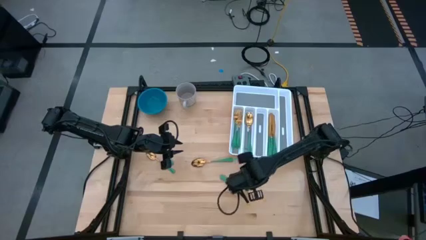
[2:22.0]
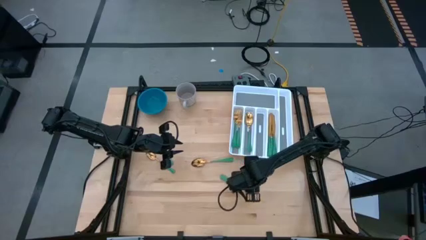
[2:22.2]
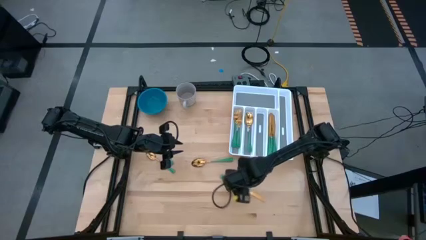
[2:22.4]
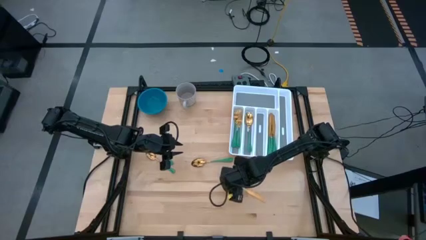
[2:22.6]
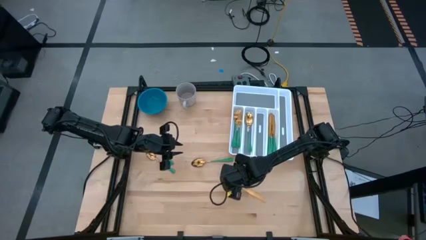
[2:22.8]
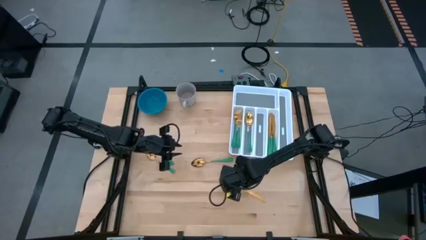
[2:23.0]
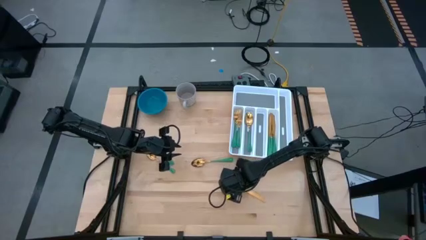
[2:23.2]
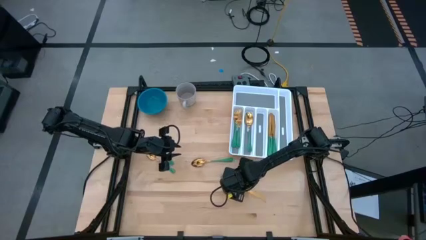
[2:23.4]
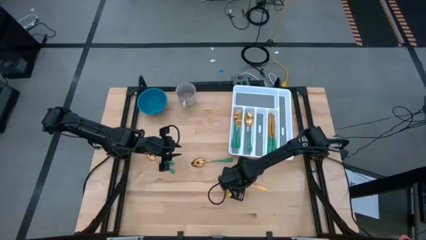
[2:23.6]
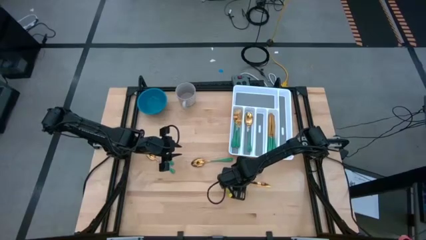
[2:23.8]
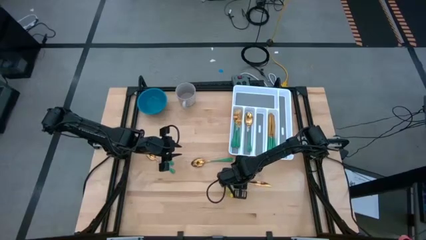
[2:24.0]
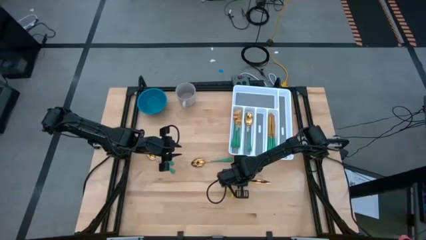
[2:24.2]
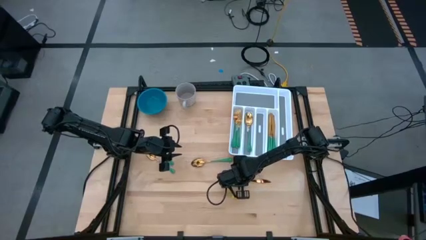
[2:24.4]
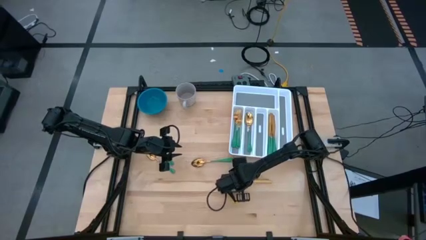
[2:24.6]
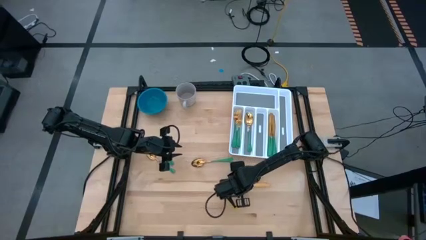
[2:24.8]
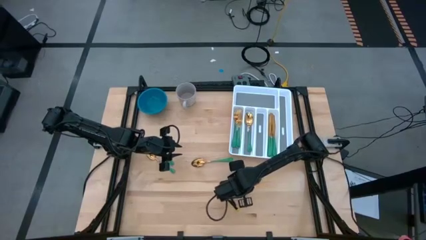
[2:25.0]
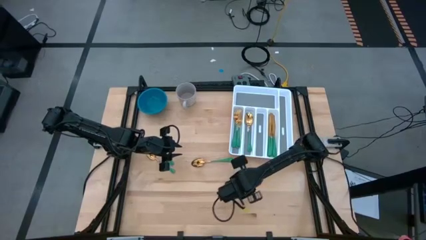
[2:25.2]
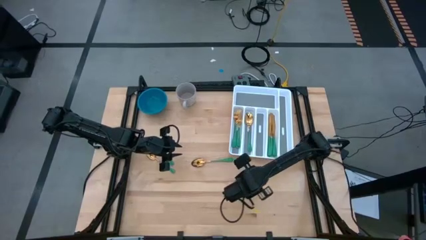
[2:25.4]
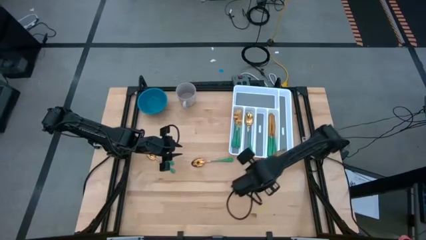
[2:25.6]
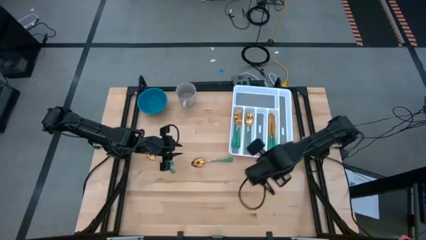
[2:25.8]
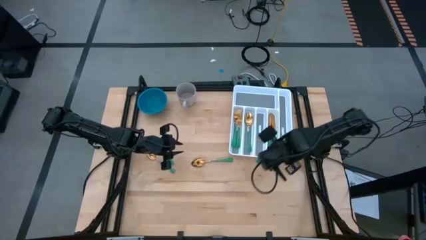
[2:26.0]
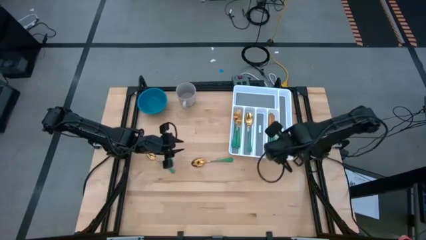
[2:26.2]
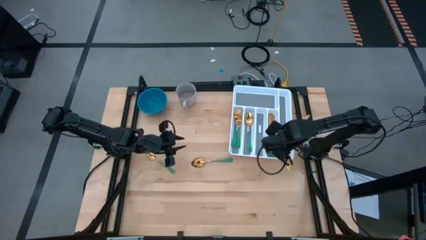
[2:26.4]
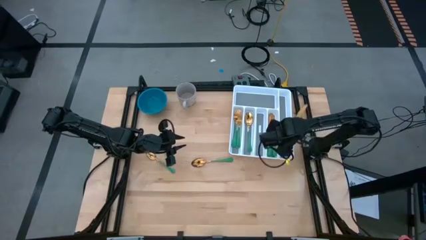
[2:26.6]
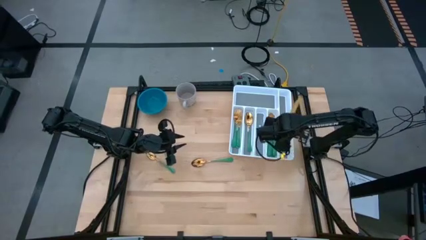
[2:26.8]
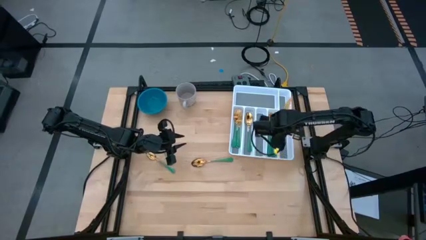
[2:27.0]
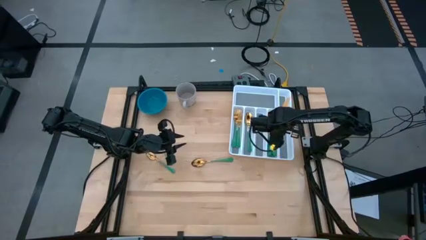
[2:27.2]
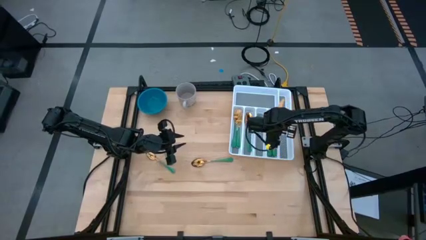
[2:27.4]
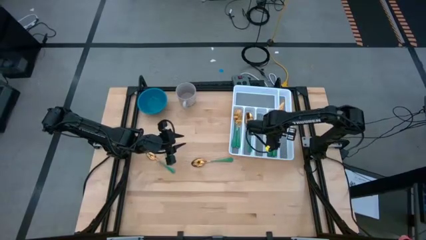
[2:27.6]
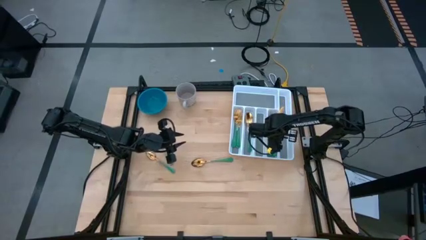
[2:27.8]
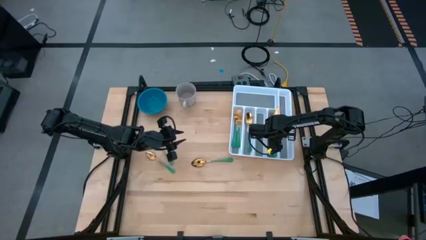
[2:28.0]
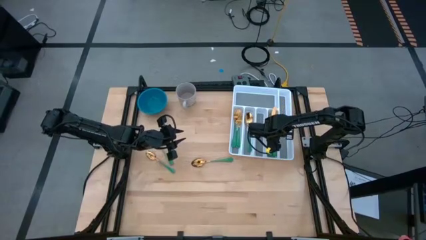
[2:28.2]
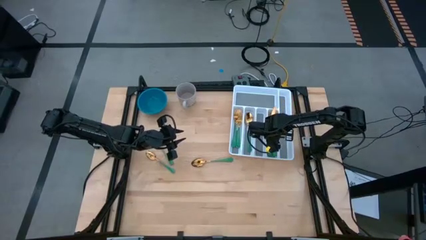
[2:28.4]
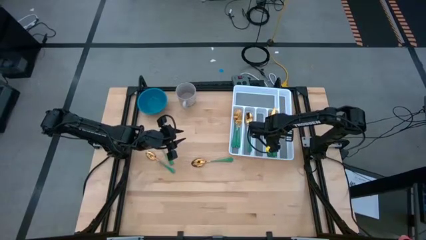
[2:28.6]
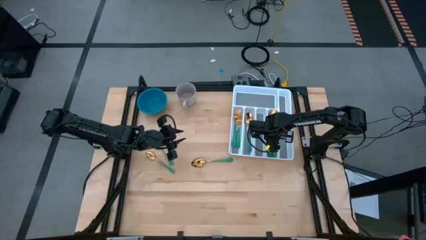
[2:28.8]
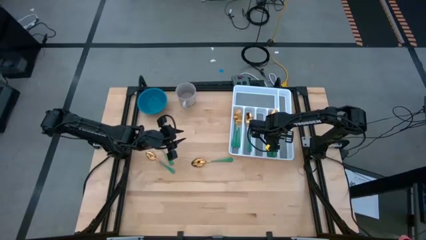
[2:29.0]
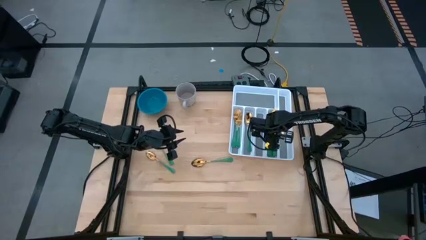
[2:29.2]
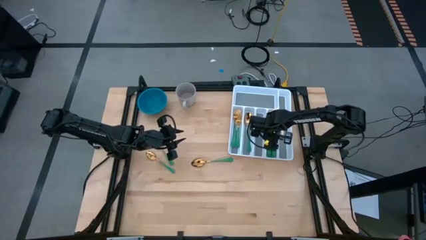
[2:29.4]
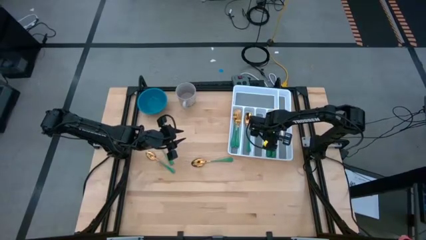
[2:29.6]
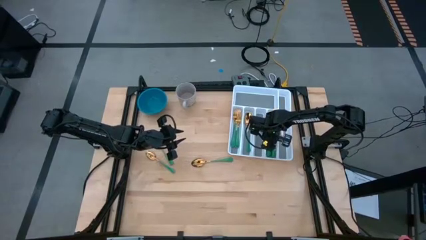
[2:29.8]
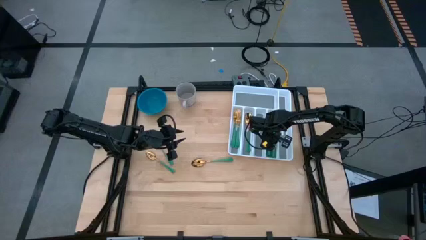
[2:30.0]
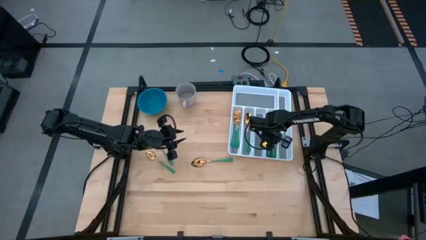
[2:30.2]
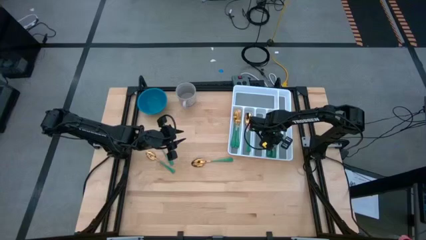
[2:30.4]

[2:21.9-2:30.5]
Task: Sort silverware
Put the green knife into the white silverware organizer

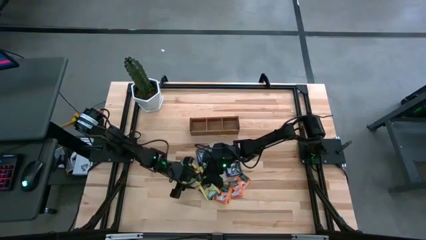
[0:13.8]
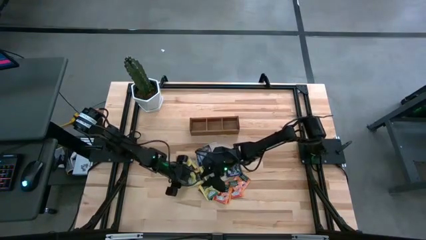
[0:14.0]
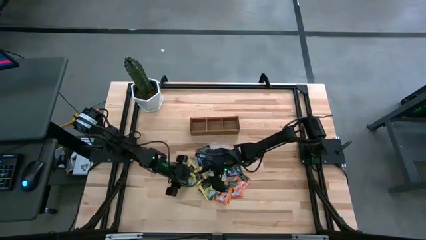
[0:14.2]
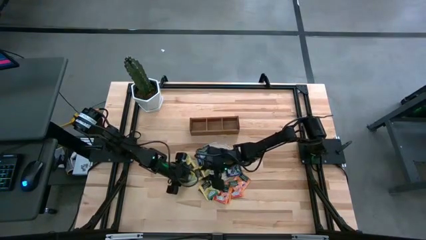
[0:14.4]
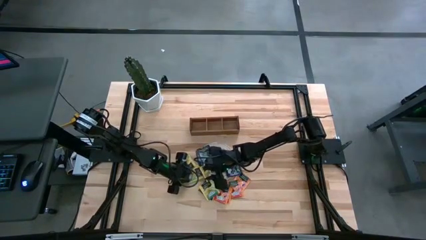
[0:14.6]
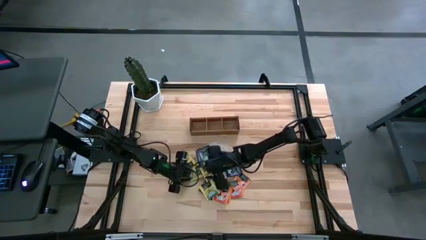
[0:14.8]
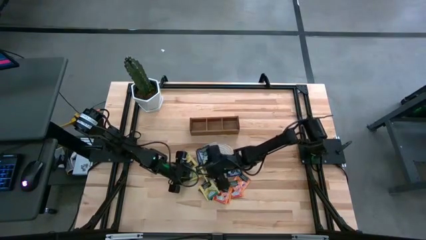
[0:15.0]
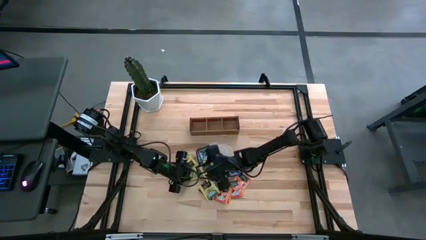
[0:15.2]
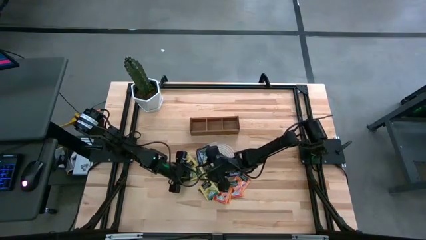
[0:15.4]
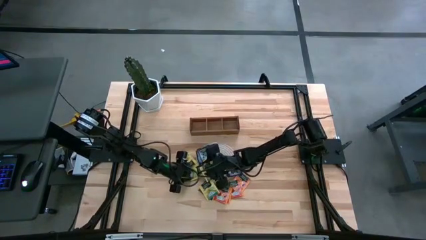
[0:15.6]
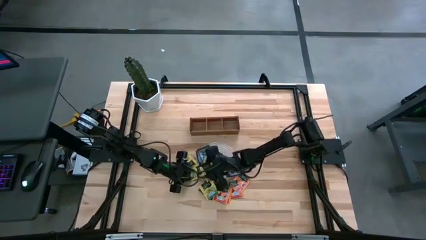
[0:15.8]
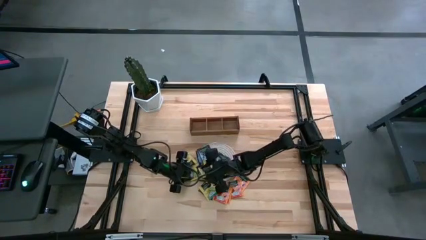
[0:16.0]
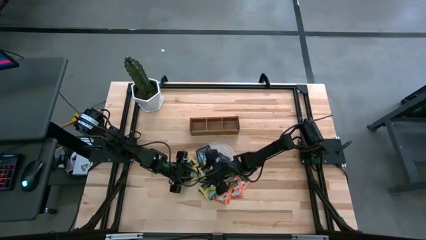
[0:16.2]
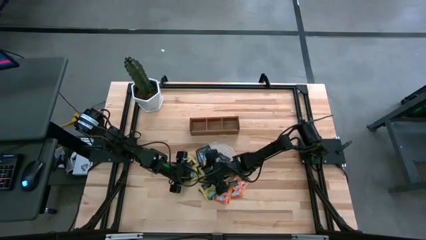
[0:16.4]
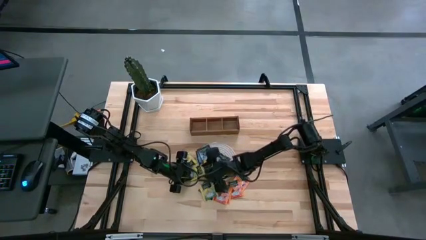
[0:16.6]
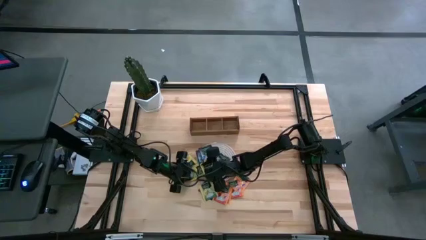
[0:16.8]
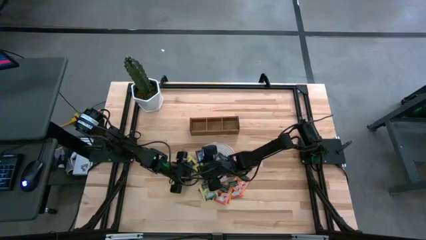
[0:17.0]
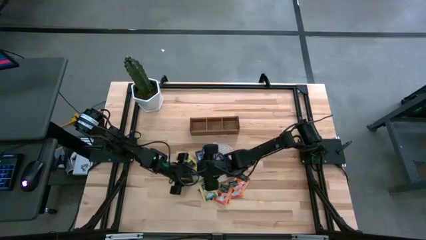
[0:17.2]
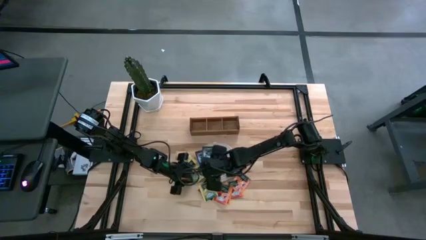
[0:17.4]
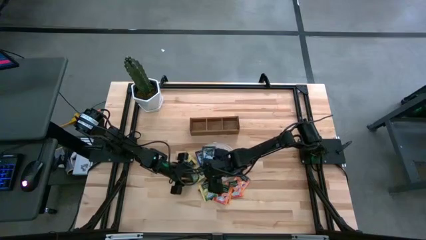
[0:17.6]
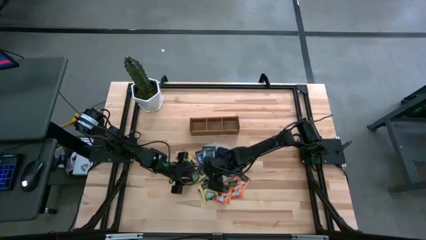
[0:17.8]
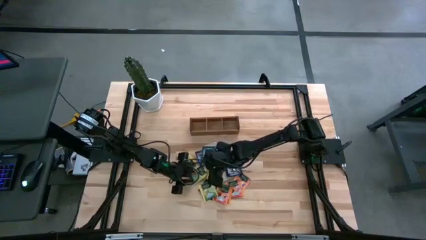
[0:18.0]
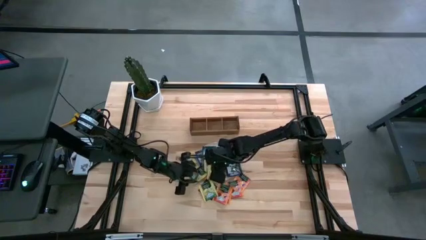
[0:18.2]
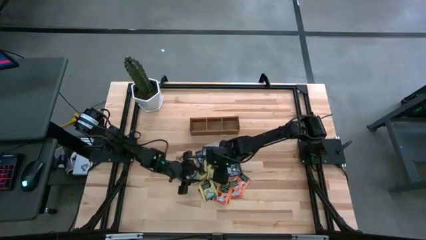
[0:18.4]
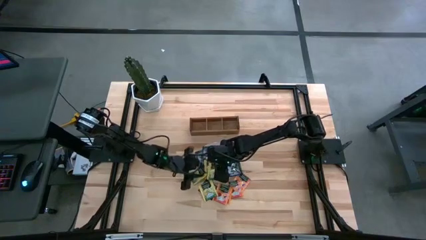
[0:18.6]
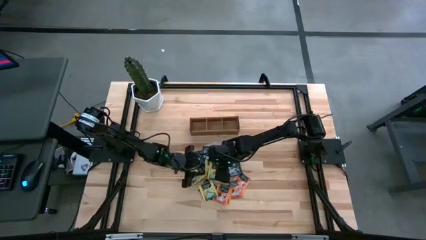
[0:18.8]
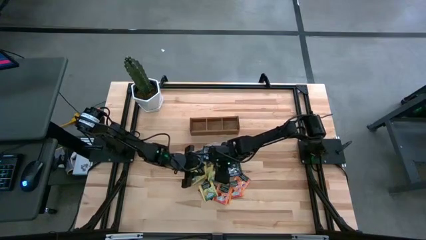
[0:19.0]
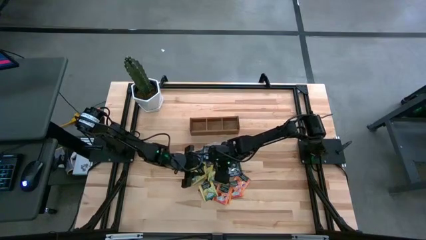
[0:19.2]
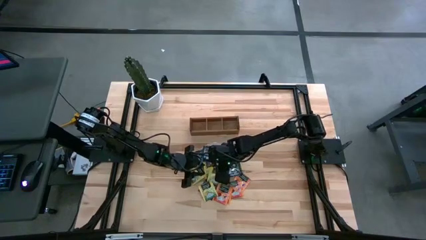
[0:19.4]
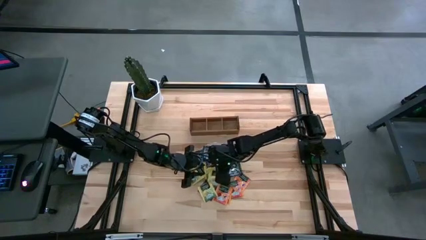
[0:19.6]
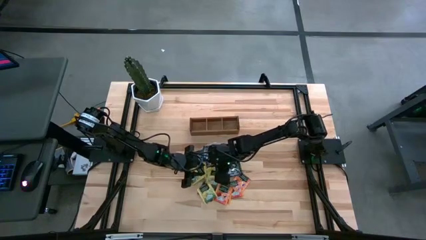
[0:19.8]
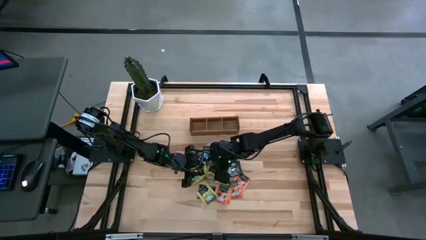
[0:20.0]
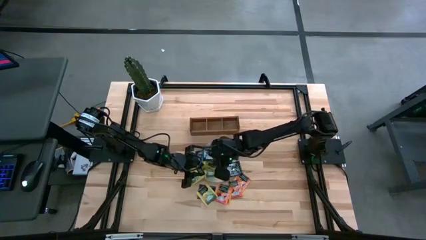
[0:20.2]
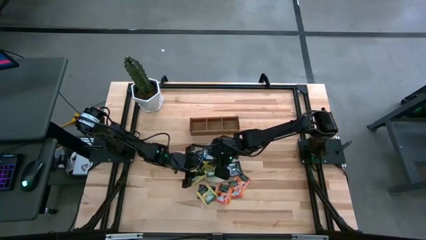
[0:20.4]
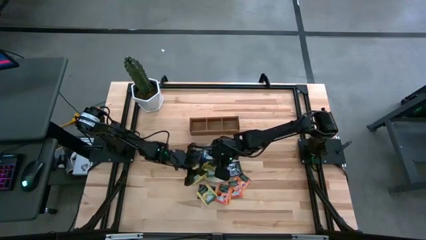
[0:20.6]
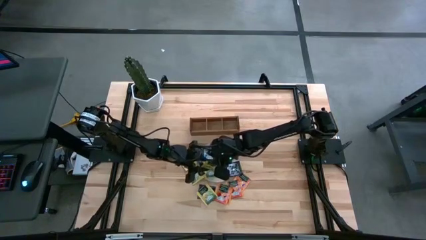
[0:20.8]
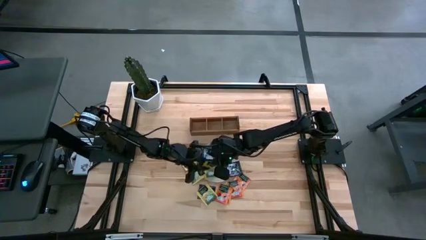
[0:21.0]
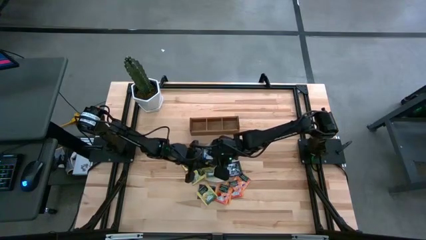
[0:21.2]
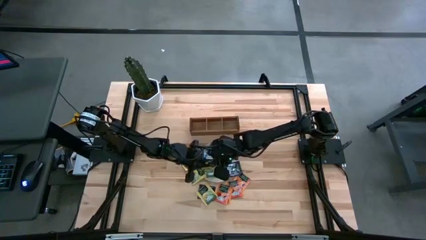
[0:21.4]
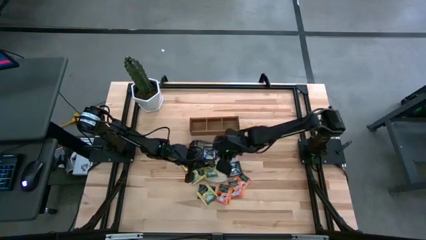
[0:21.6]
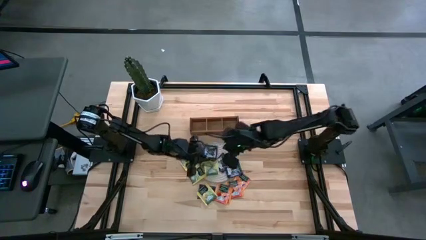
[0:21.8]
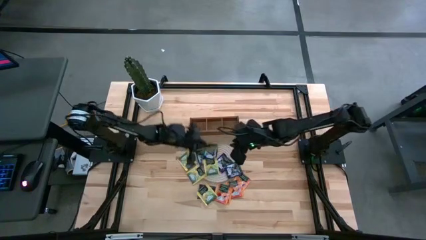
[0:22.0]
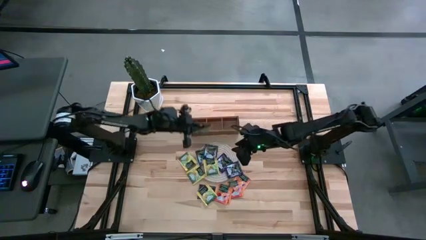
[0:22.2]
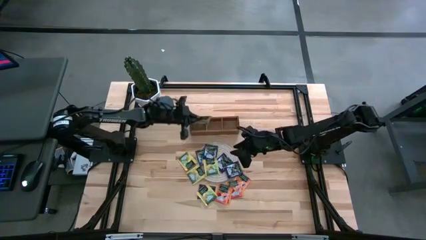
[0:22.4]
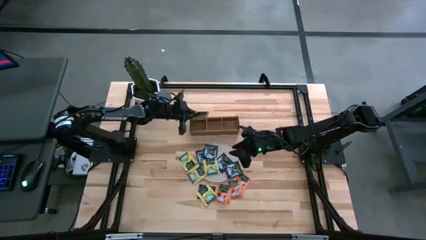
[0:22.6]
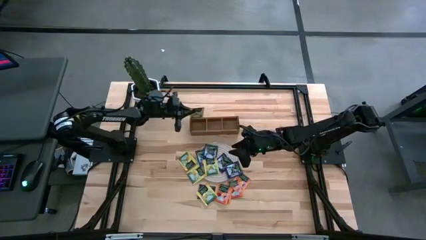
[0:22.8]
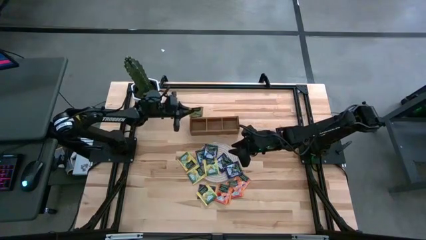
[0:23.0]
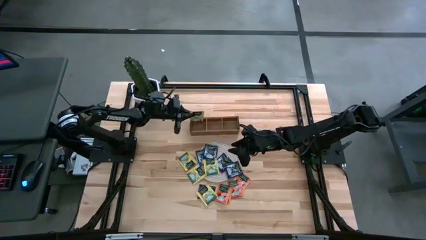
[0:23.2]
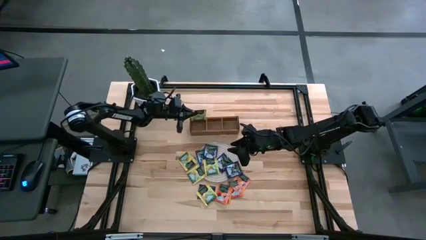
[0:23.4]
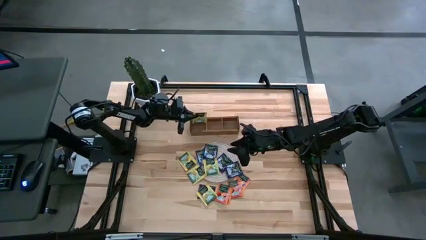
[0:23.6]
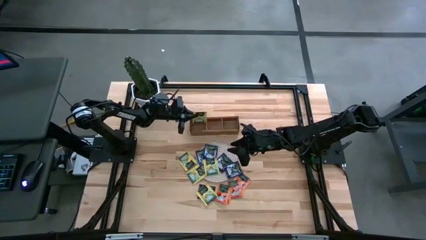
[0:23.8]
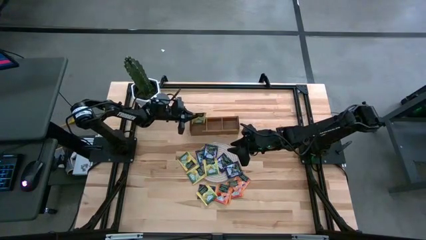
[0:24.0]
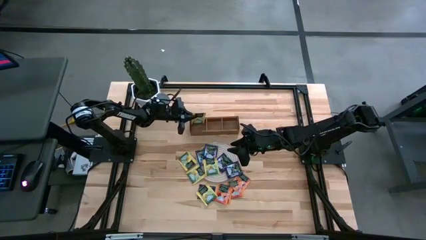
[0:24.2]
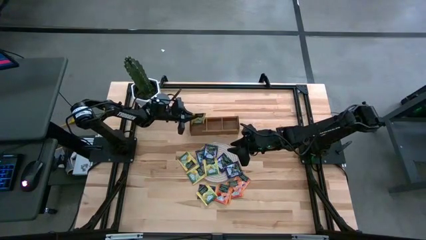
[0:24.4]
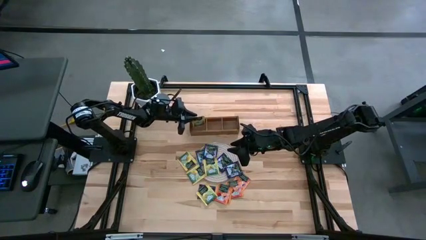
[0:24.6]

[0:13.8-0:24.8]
Task: Pick & Place Tea
Put the yellow tea bag into the left section of the wooden organizer
